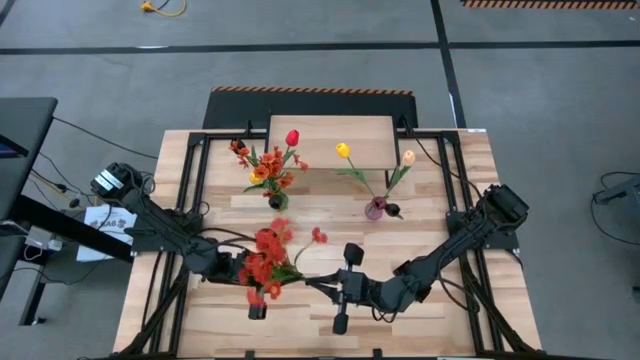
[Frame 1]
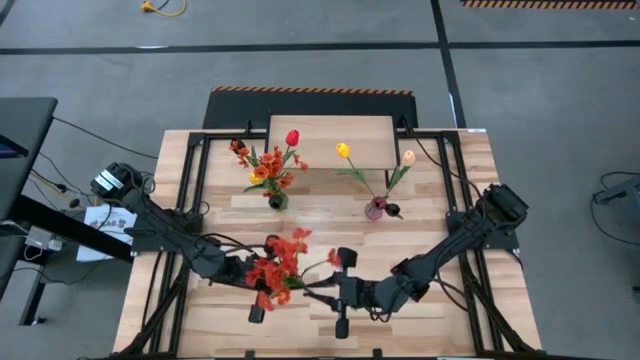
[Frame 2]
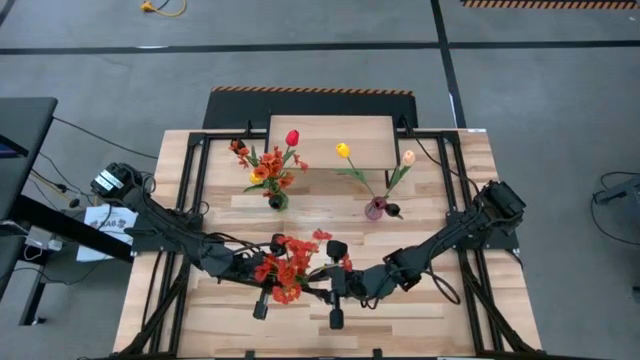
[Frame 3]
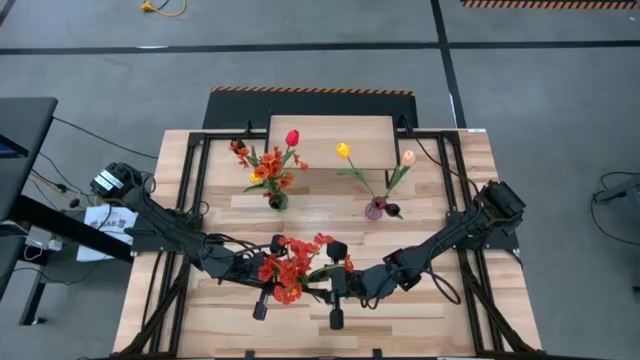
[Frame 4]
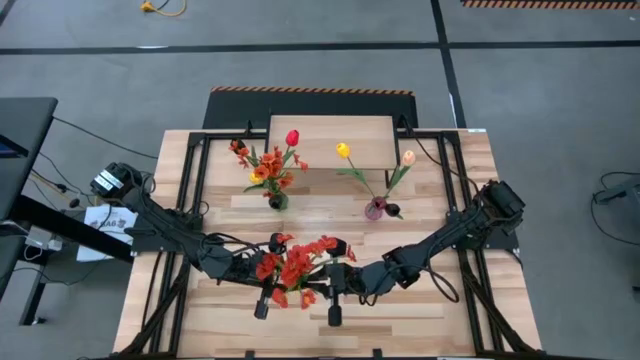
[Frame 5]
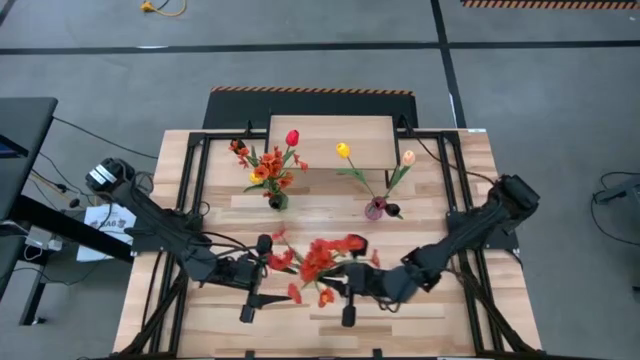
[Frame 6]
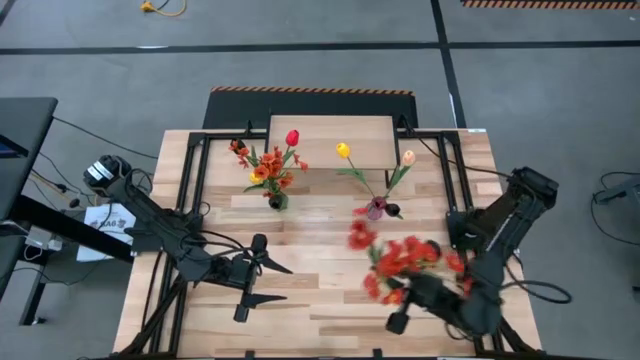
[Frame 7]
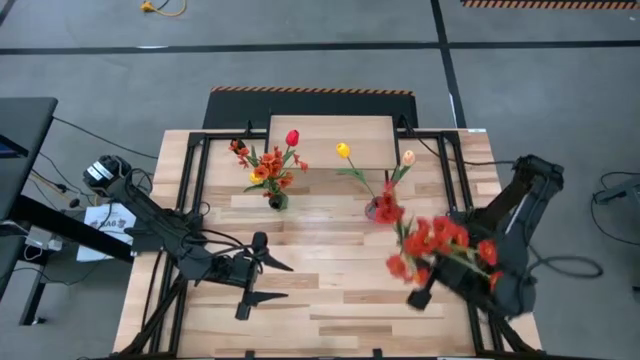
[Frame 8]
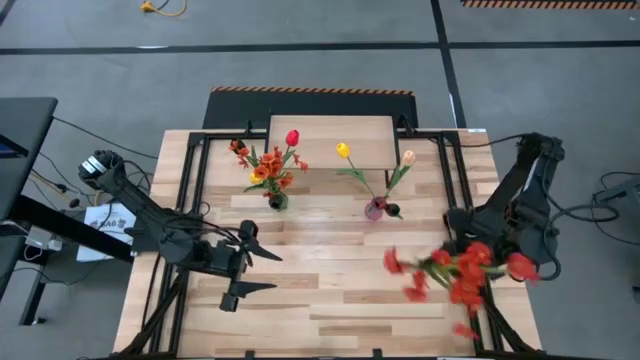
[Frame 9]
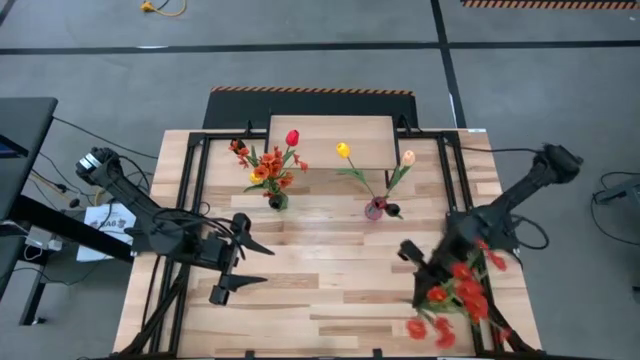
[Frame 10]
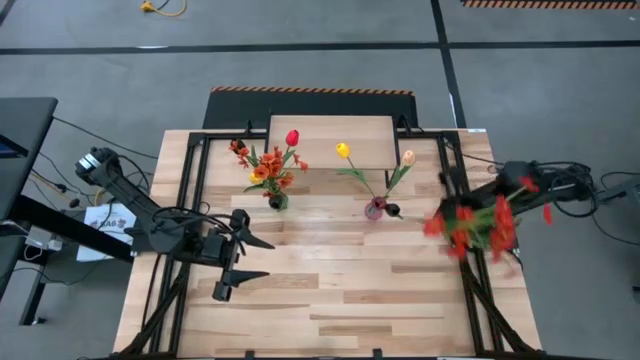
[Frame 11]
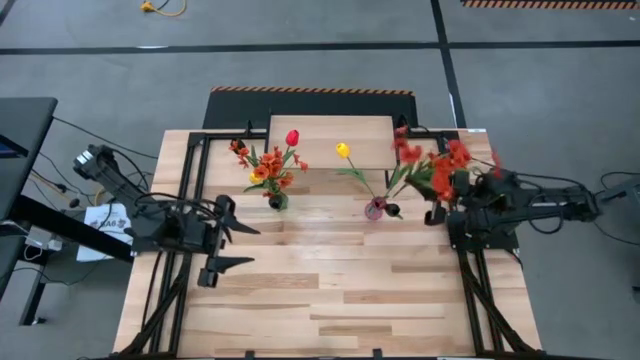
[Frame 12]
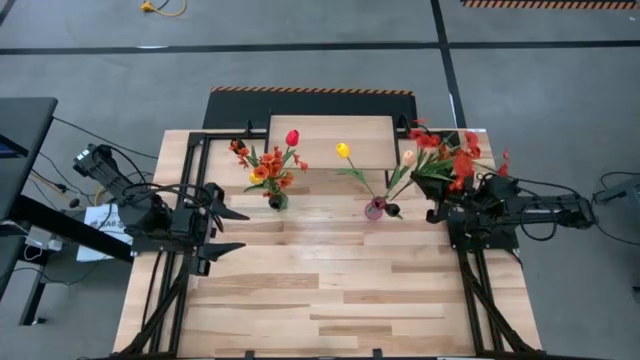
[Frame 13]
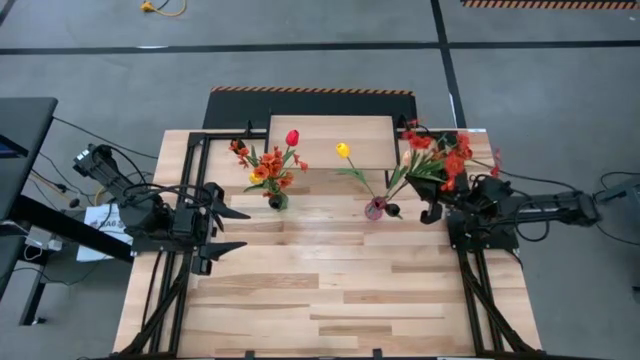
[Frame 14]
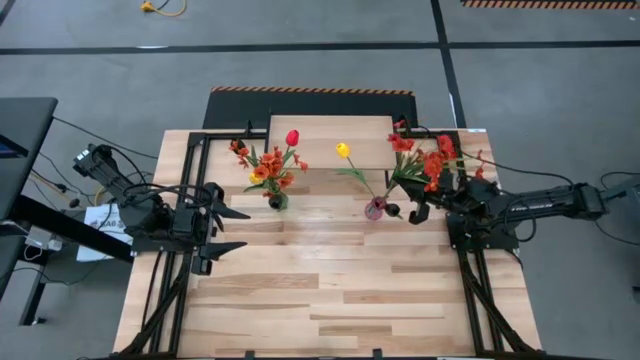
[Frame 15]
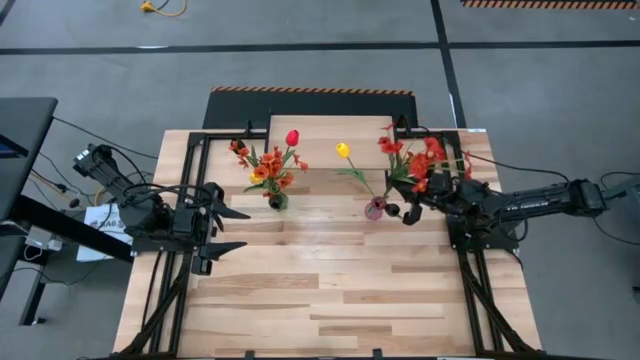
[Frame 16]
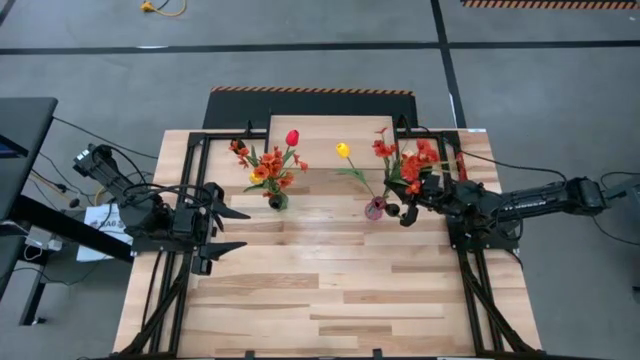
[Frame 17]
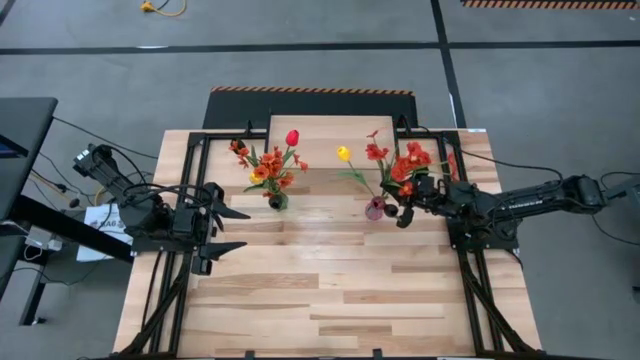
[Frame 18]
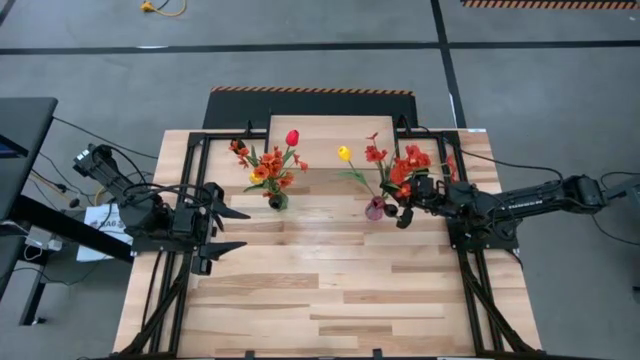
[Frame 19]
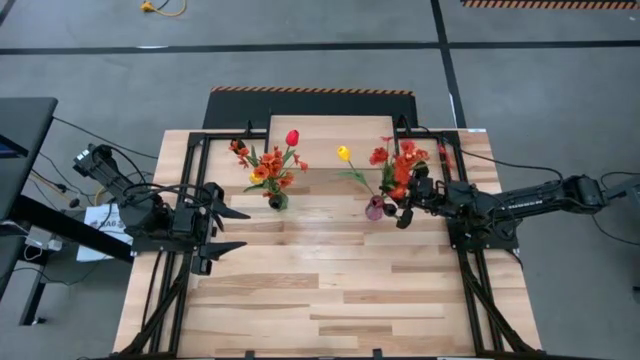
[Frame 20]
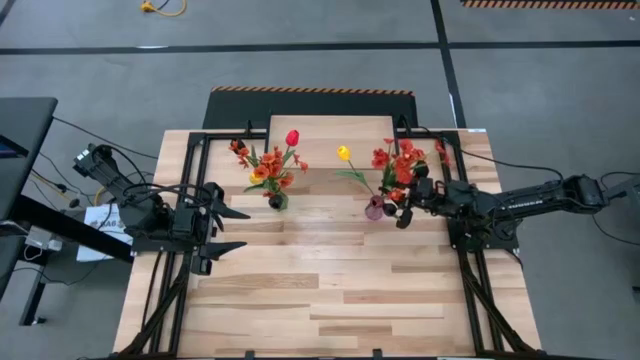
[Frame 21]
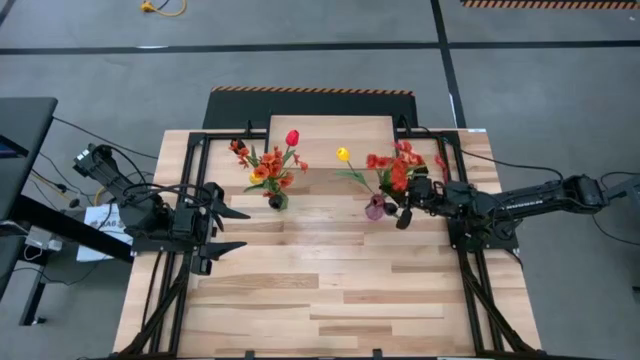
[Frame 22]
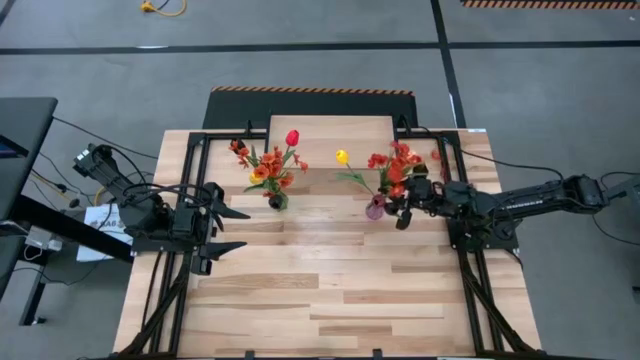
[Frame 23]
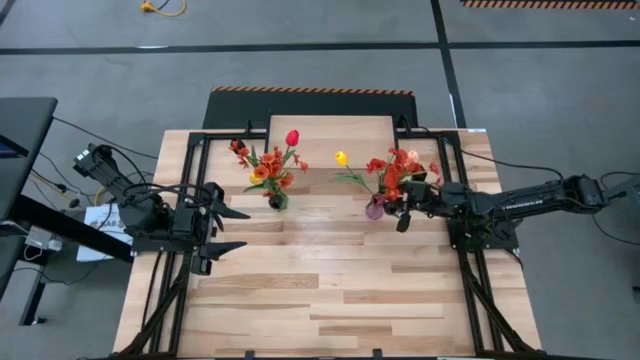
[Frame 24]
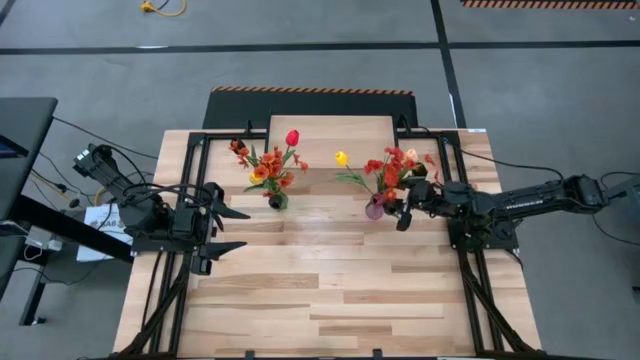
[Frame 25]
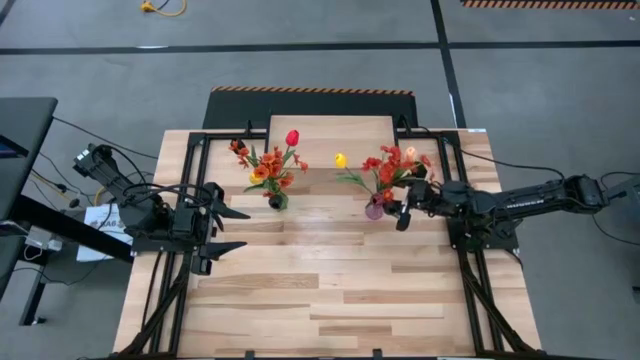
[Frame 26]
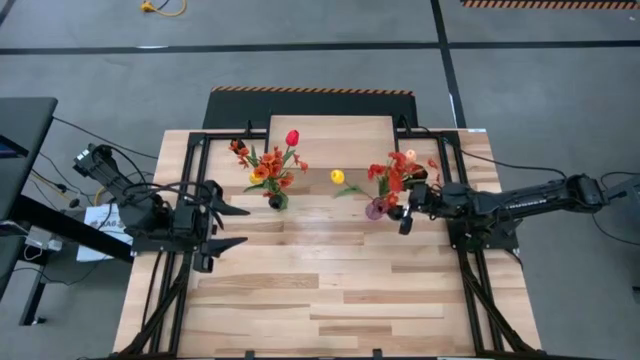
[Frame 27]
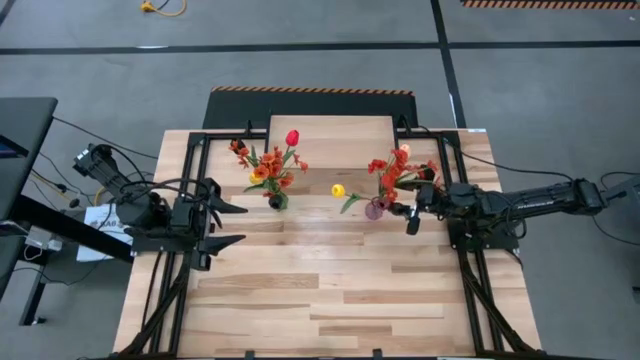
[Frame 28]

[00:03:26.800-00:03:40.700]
Task: Pick and place flowers into a vace then onto a shelf
Put the orange flowers into the purple vase

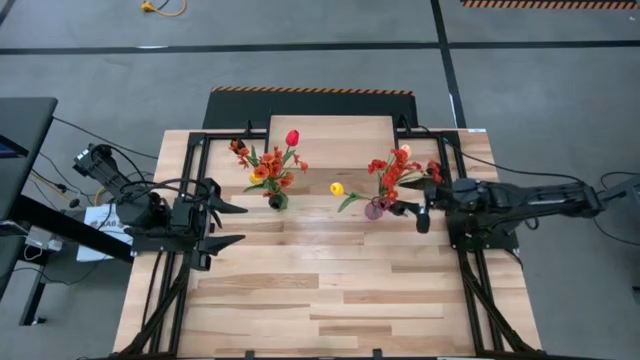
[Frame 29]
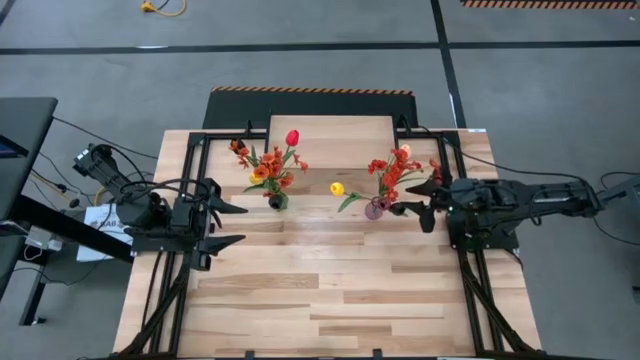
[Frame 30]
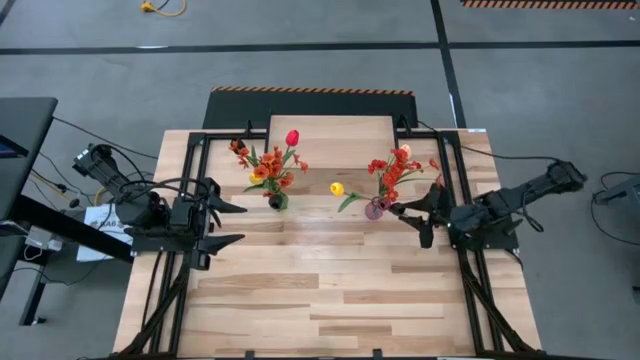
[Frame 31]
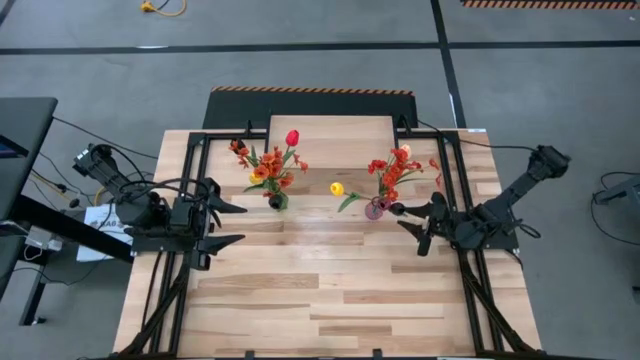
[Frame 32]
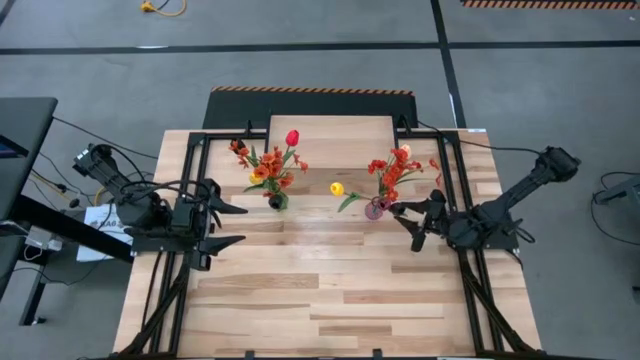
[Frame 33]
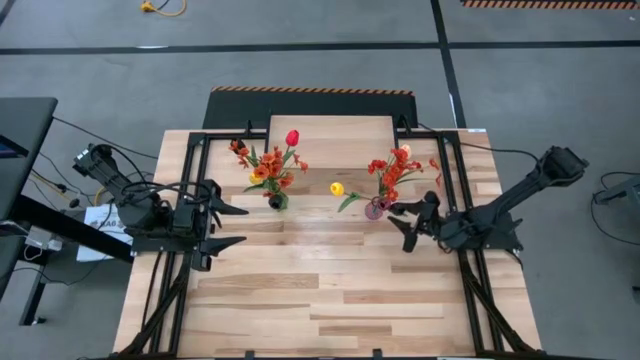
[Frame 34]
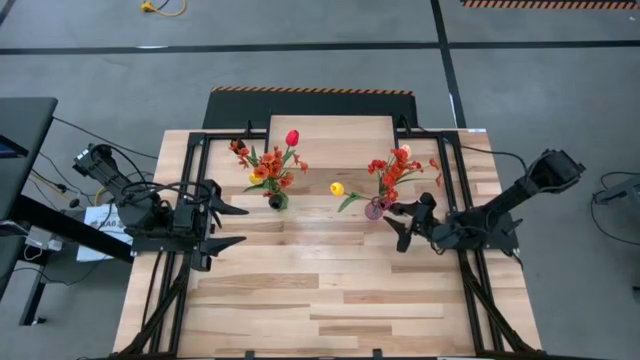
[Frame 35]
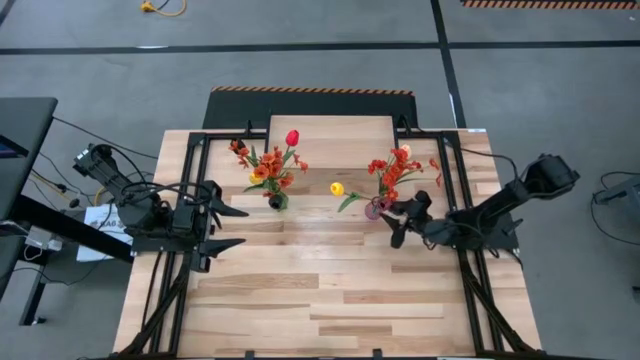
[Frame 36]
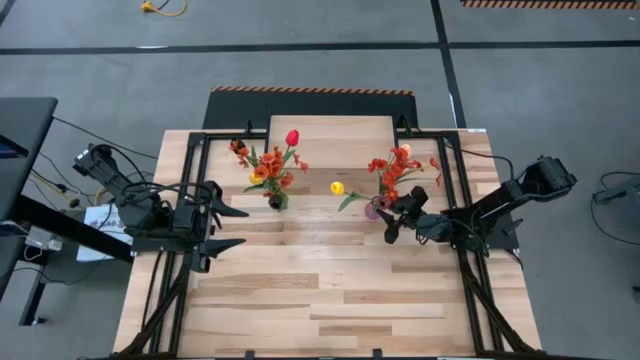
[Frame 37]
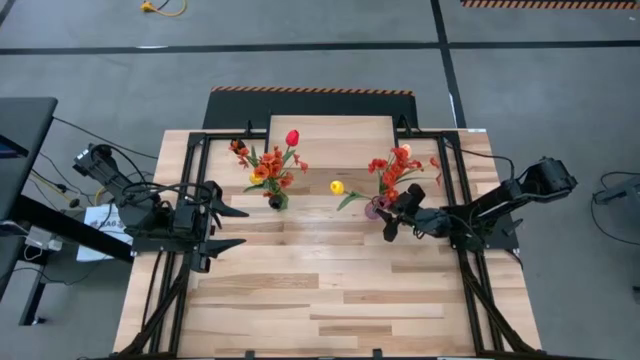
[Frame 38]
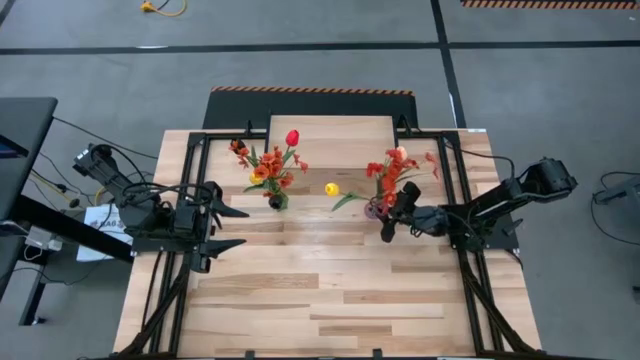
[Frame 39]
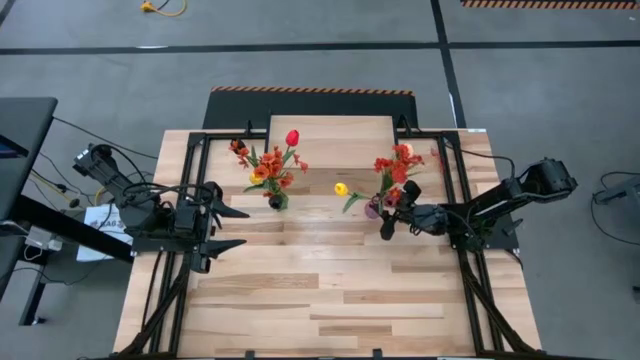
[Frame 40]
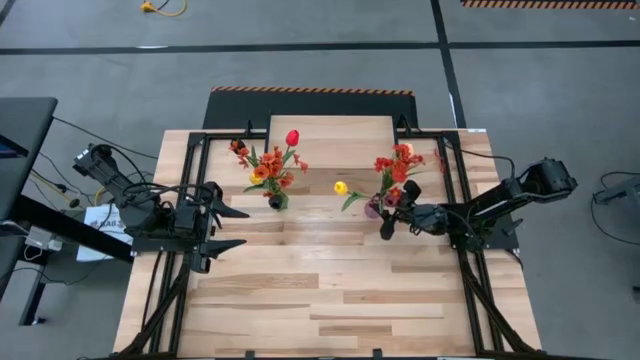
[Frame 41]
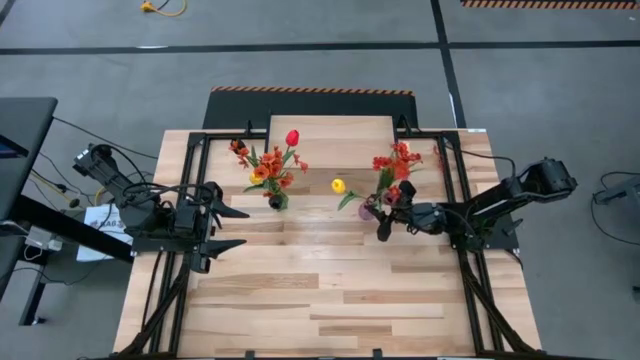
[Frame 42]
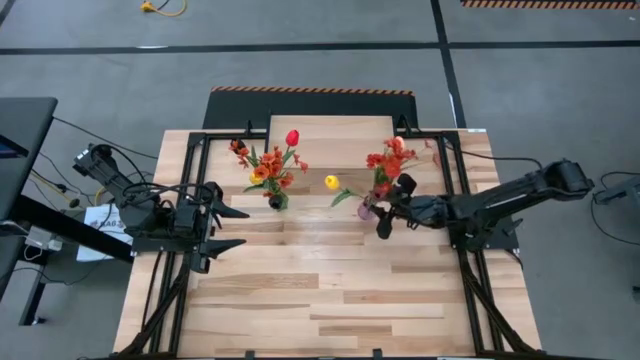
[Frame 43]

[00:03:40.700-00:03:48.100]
Put the purple vase on the shelf
